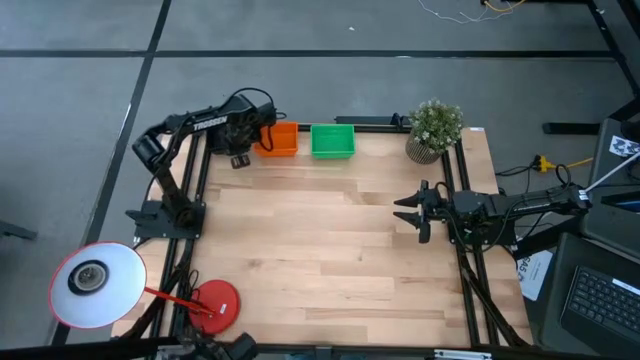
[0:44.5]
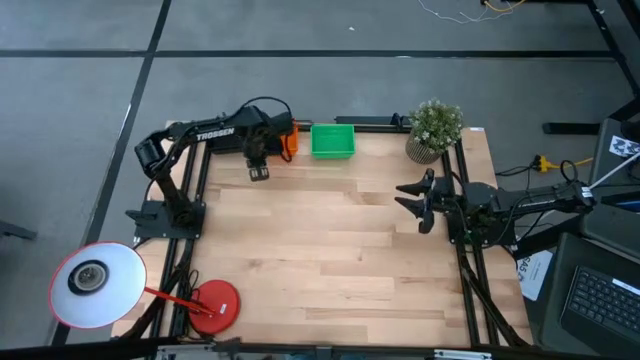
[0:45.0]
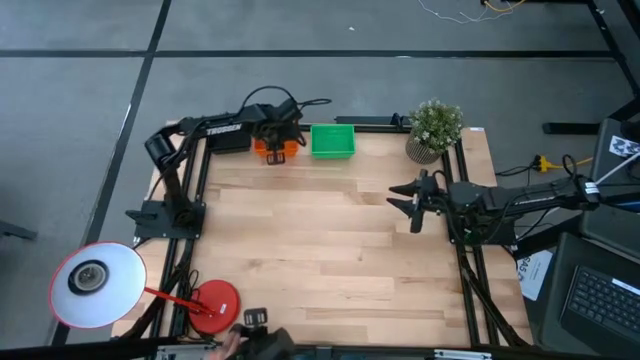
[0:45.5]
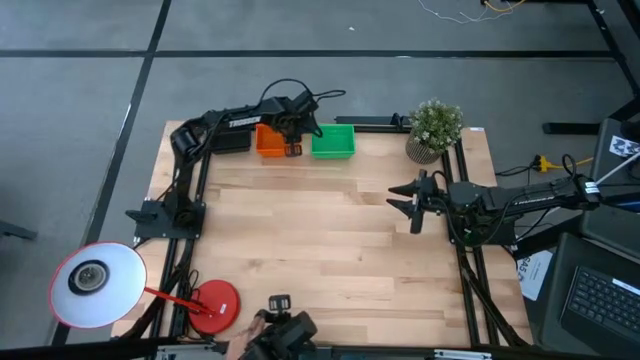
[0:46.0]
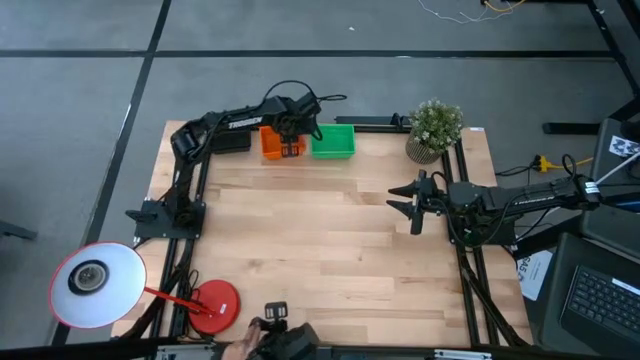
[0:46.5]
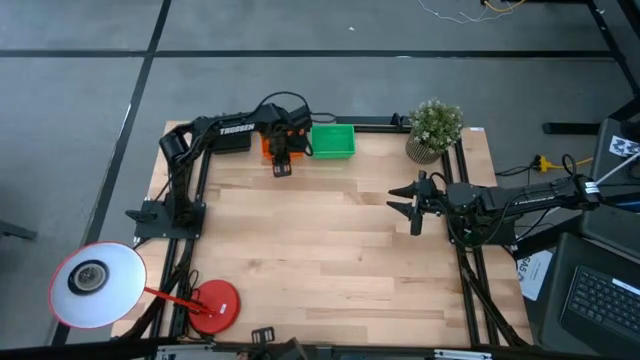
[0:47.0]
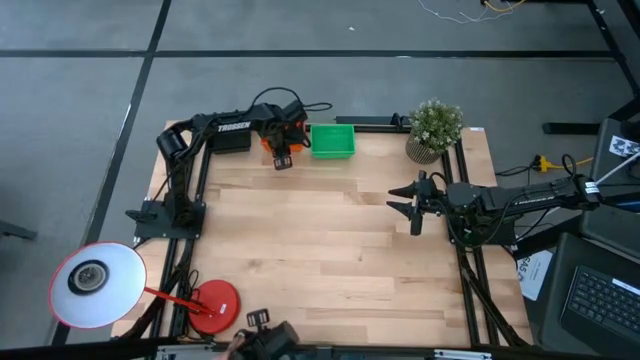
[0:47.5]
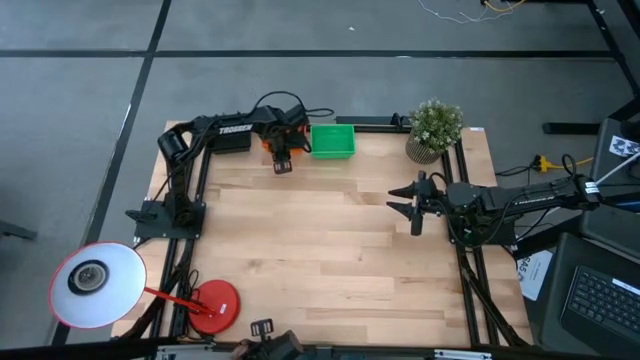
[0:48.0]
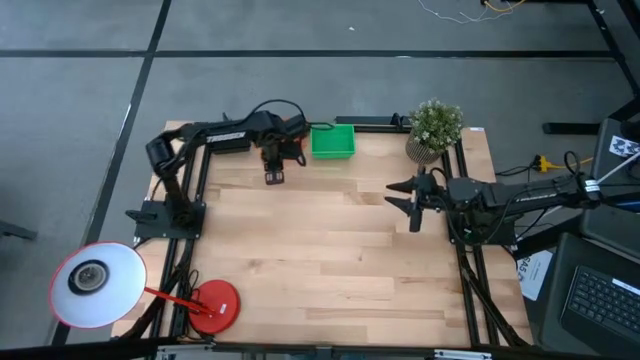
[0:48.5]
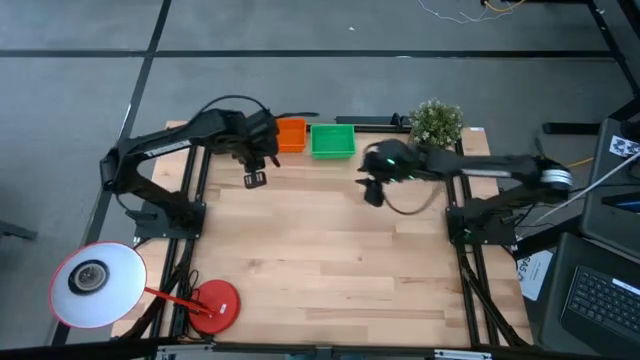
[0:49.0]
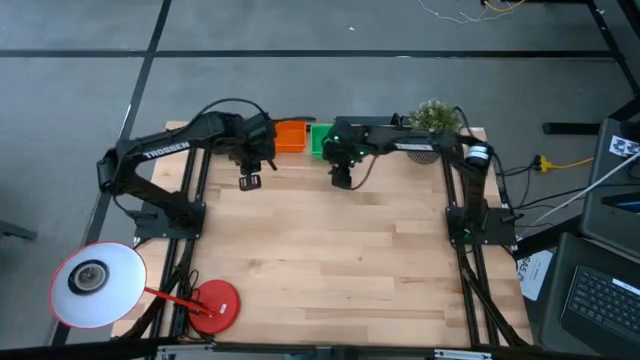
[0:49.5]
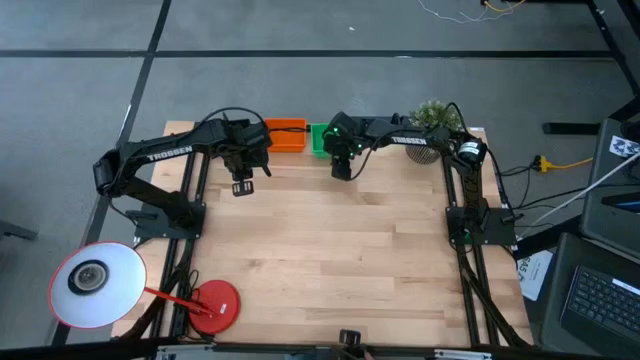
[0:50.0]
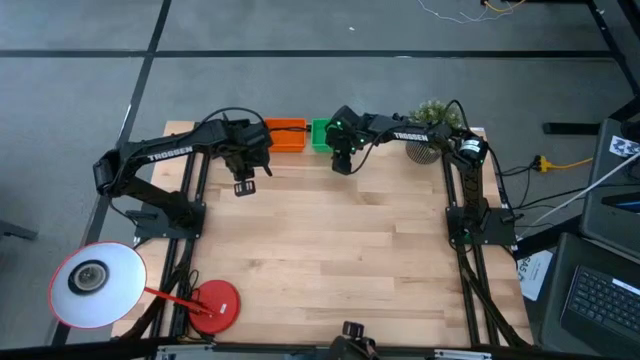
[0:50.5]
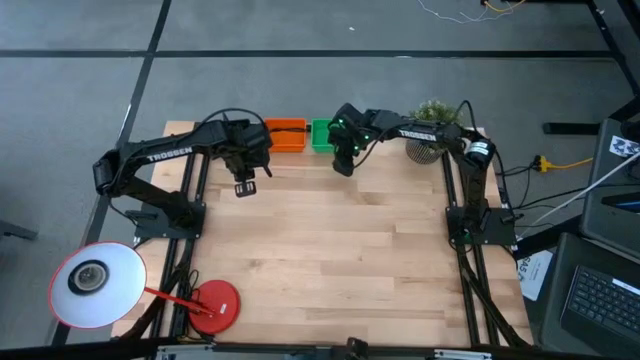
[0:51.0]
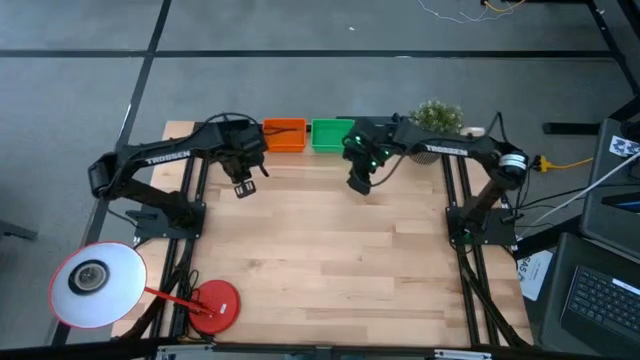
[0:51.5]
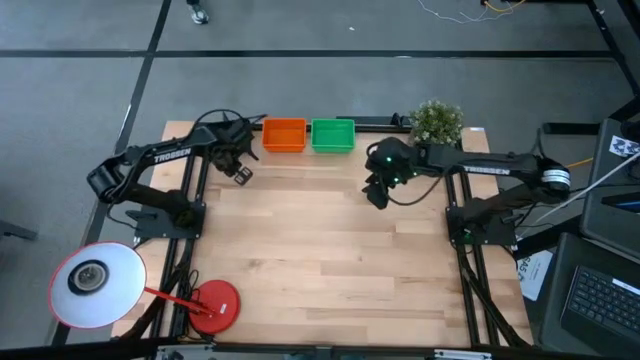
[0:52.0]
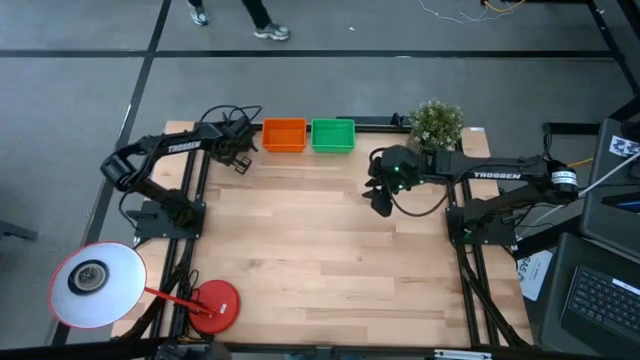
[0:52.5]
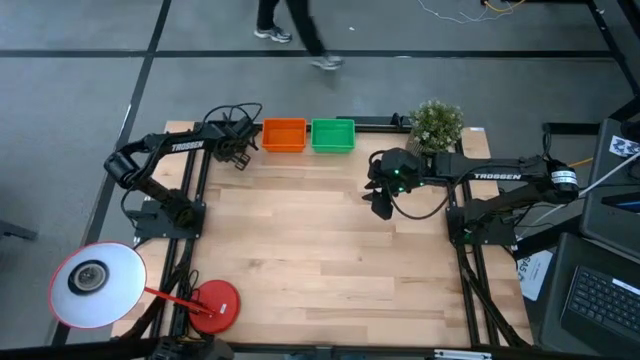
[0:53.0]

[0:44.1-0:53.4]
Adjust the stacked bins

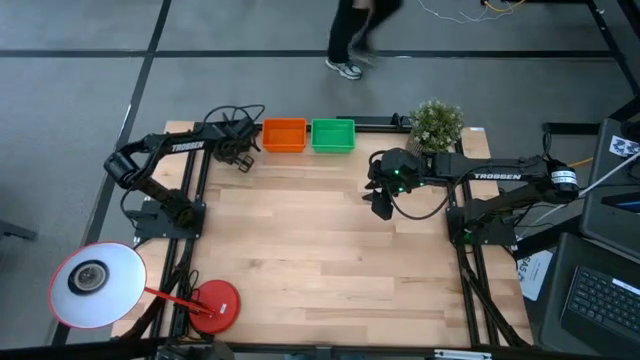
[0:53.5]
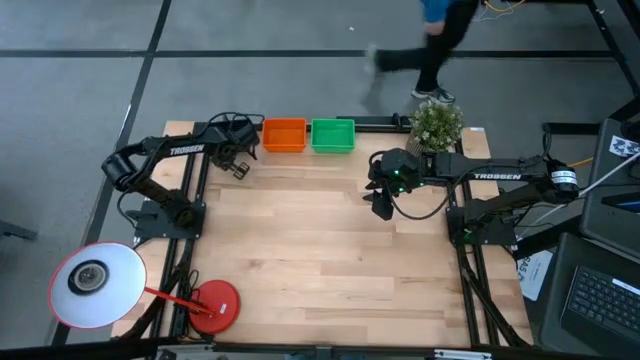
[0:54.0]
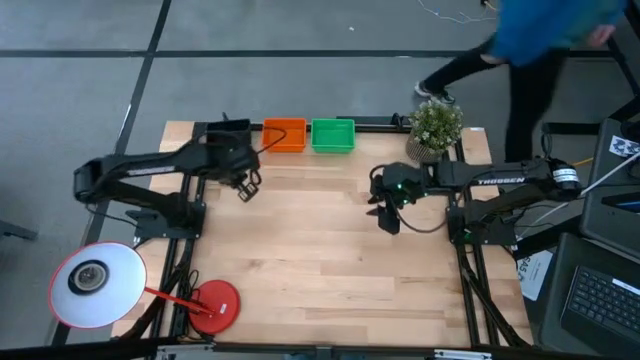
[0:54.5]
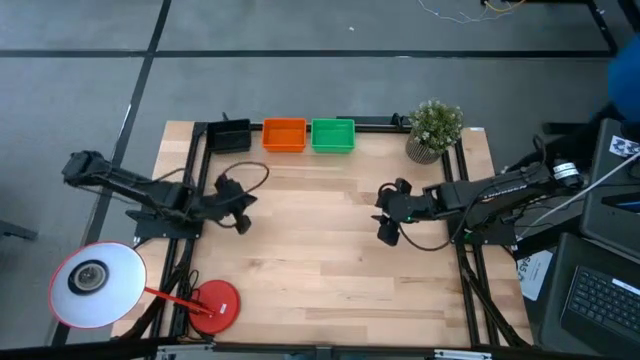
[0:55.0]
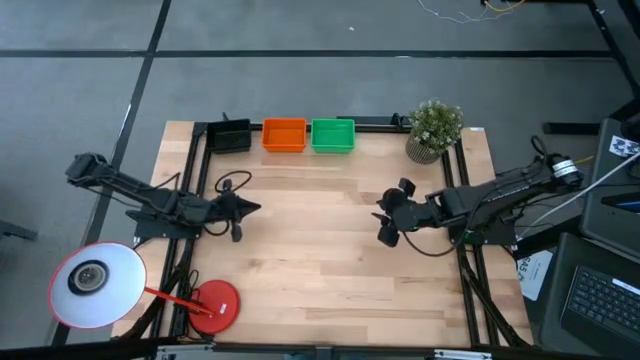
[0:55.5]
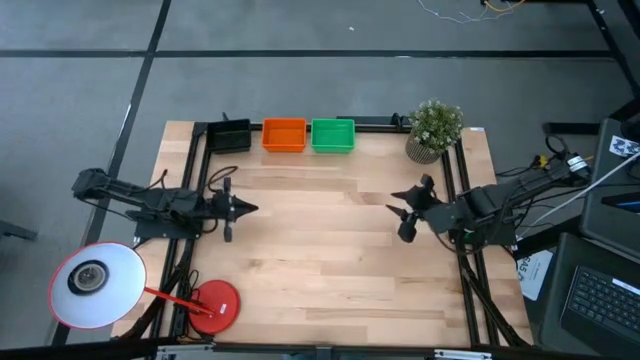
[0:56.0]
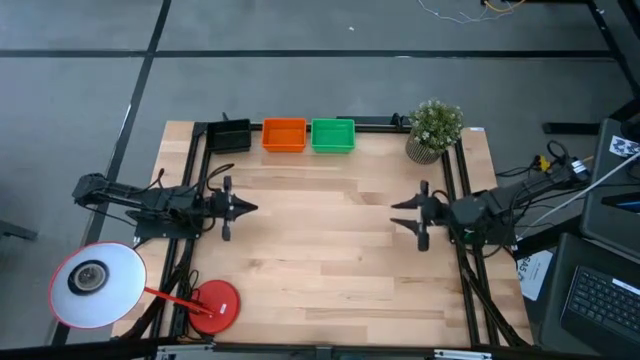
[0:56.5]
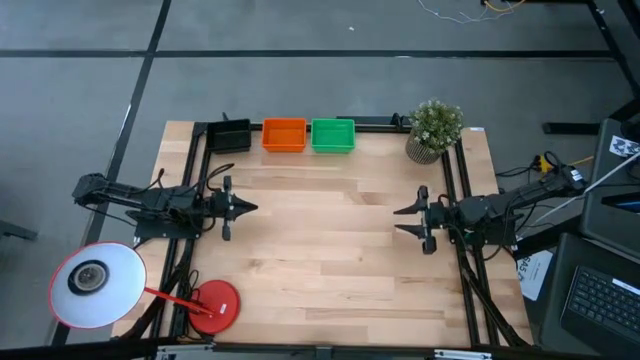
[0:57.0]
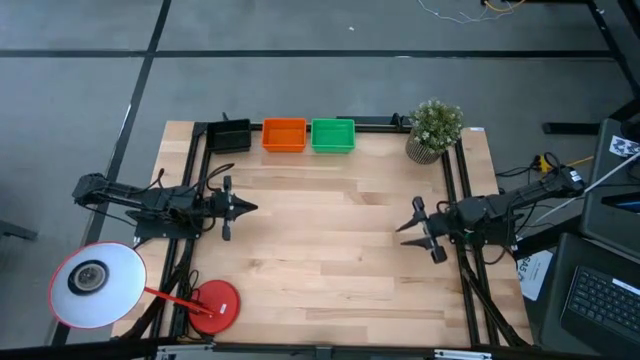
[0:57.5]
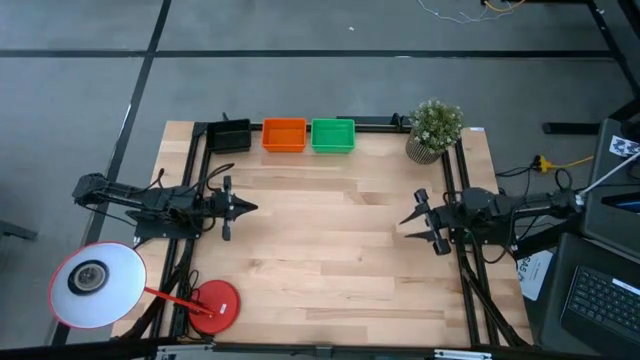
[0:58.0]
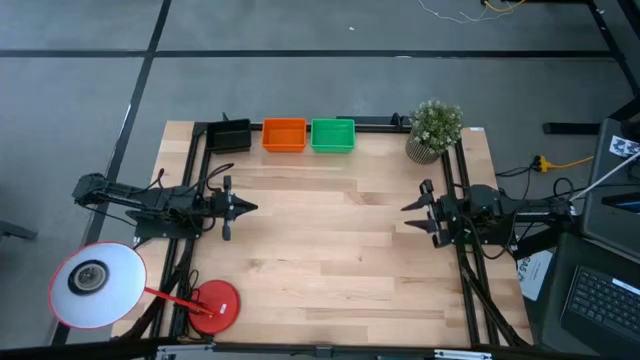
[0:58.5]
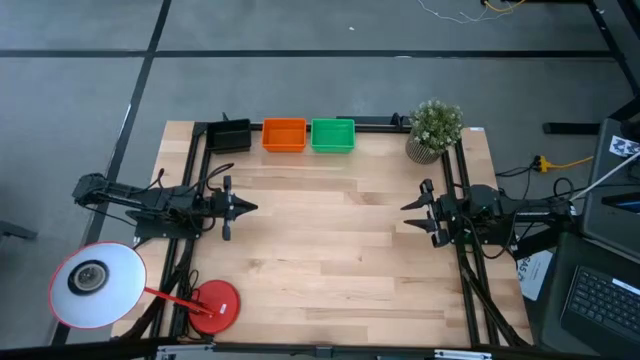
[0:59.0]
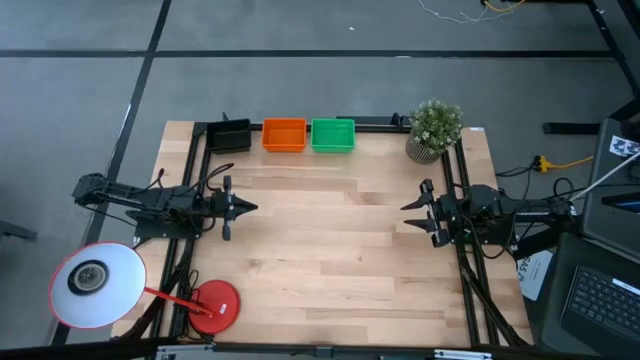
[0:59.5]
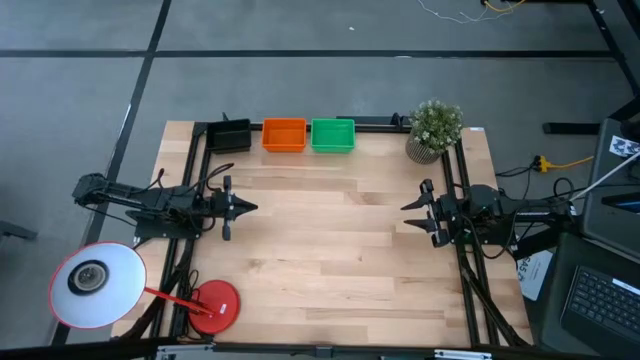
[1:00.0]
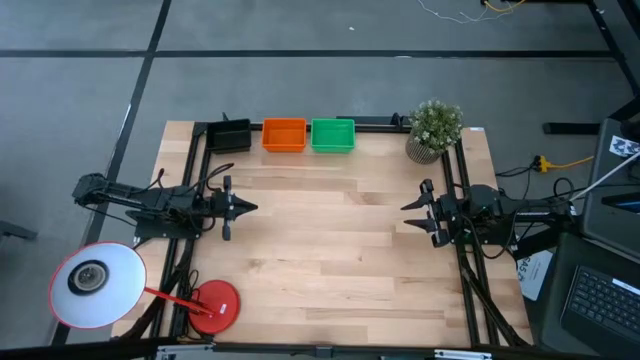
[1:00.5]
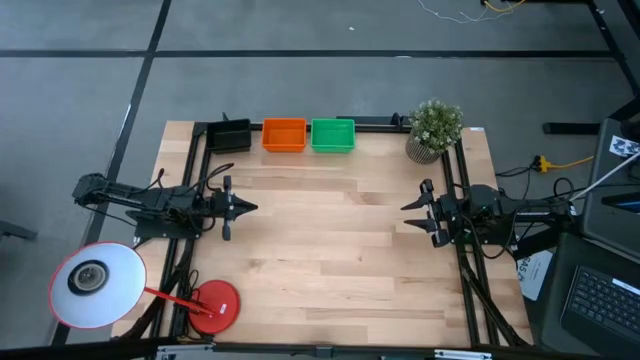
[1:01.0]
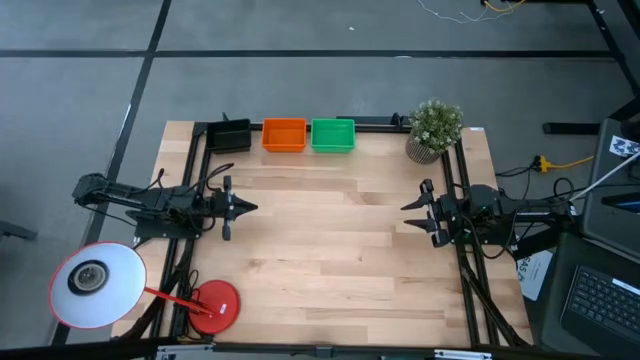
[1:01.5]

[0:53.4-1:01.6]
Return to Home Position
